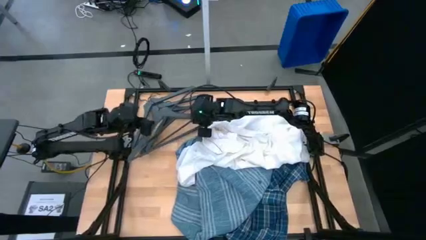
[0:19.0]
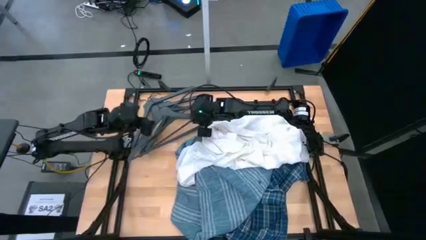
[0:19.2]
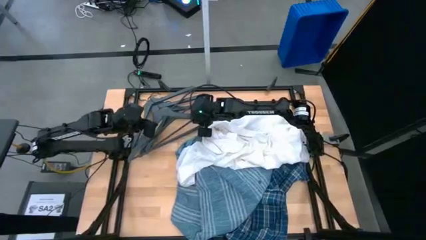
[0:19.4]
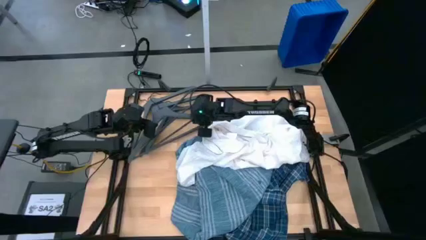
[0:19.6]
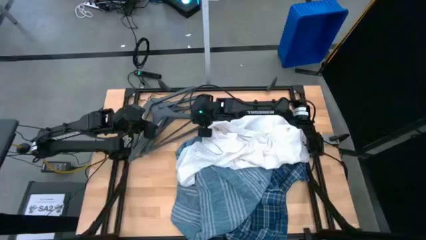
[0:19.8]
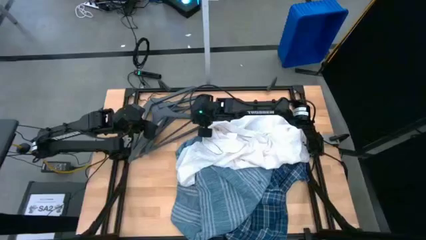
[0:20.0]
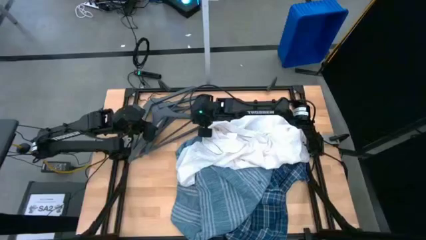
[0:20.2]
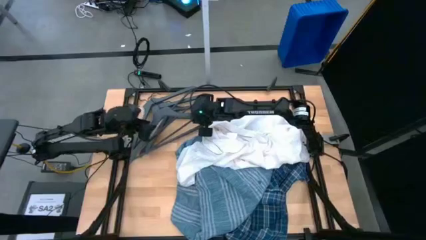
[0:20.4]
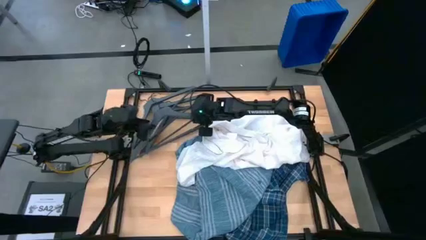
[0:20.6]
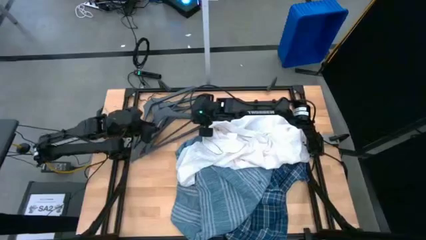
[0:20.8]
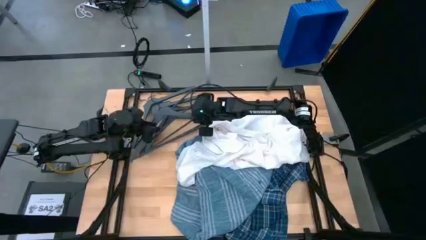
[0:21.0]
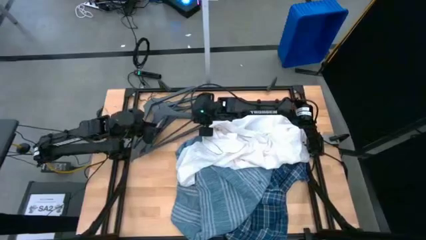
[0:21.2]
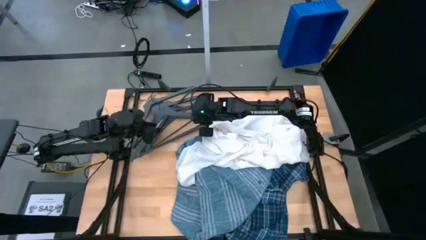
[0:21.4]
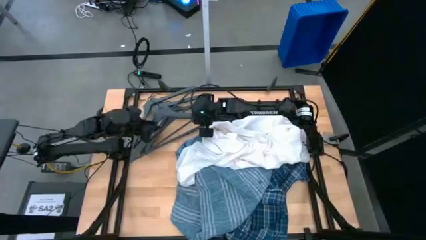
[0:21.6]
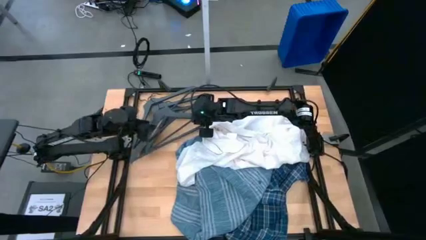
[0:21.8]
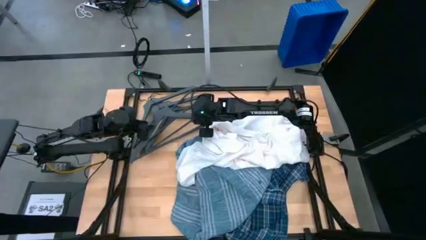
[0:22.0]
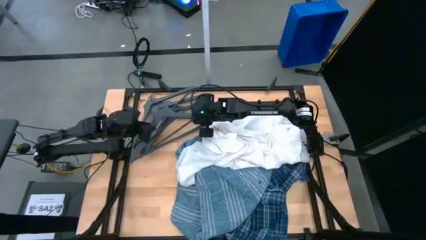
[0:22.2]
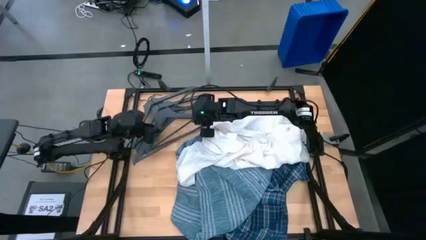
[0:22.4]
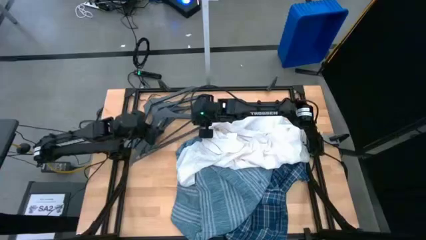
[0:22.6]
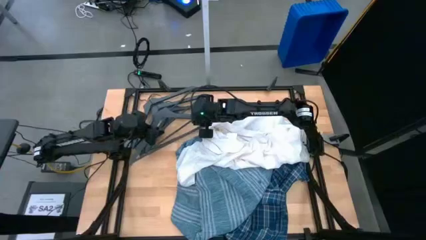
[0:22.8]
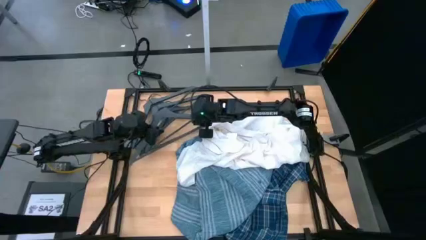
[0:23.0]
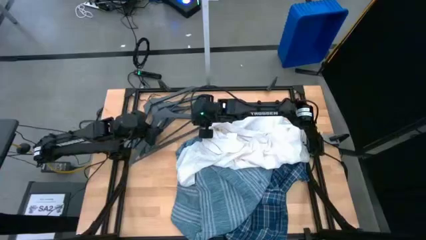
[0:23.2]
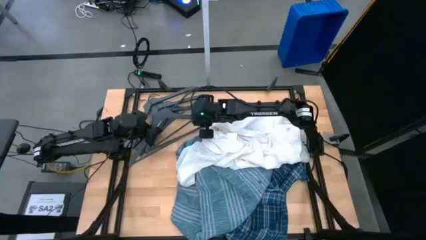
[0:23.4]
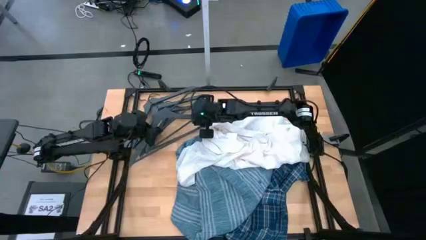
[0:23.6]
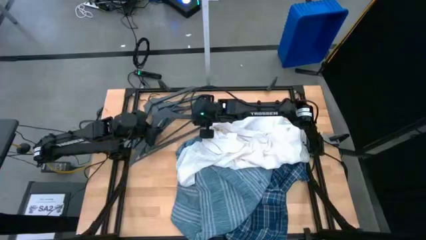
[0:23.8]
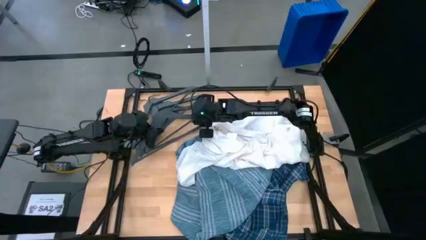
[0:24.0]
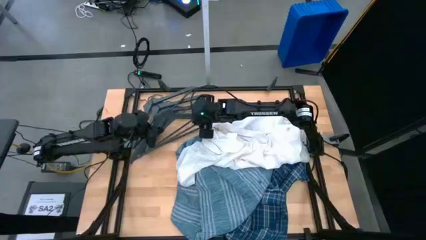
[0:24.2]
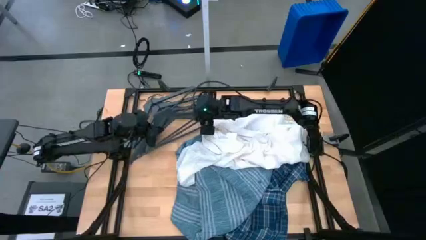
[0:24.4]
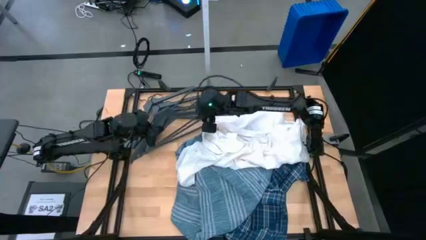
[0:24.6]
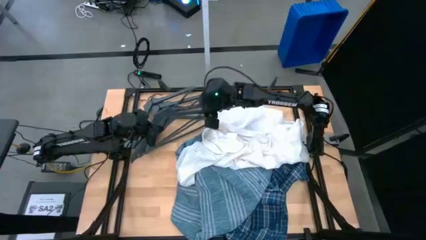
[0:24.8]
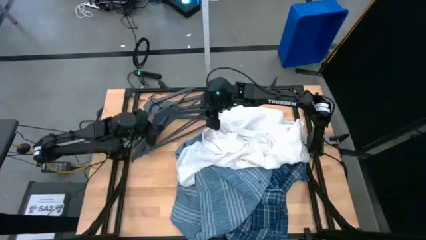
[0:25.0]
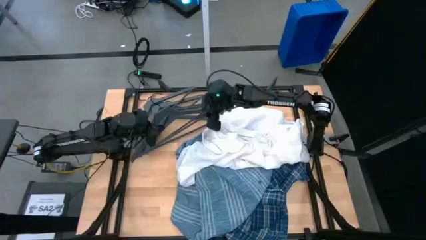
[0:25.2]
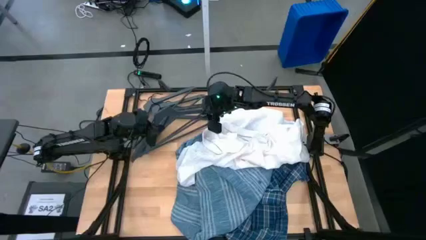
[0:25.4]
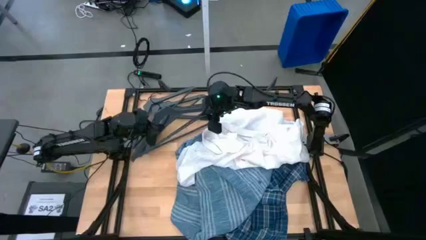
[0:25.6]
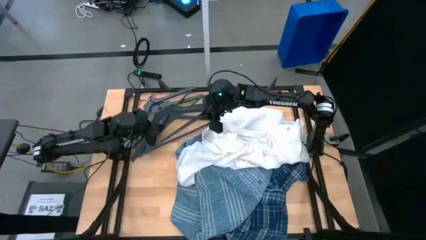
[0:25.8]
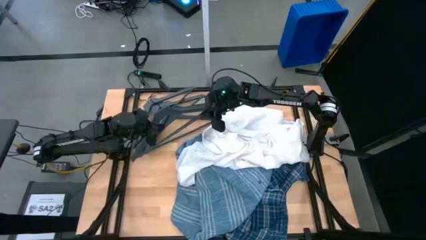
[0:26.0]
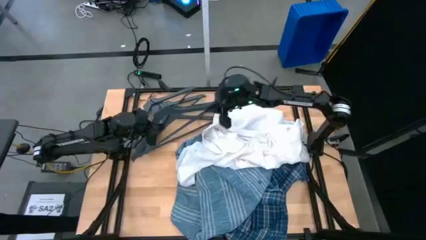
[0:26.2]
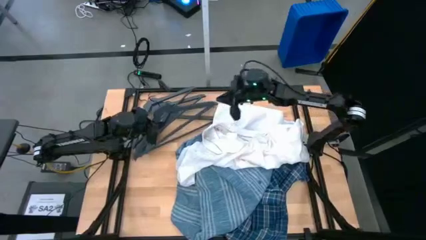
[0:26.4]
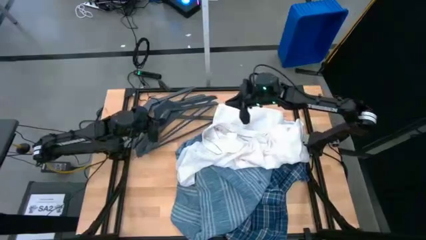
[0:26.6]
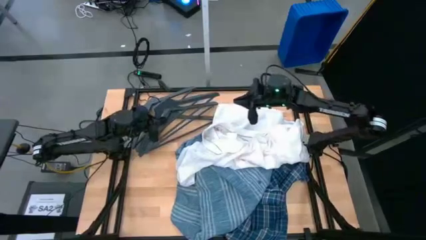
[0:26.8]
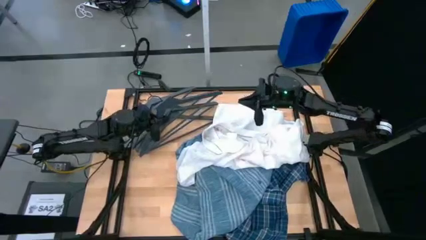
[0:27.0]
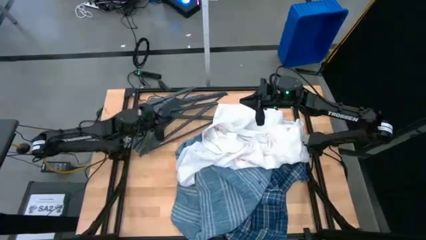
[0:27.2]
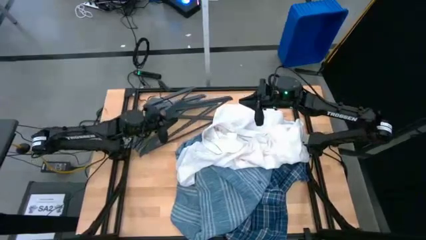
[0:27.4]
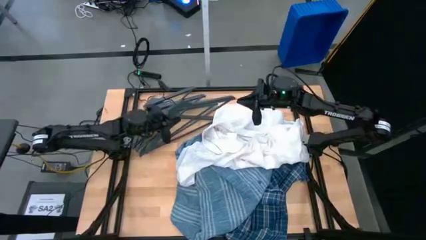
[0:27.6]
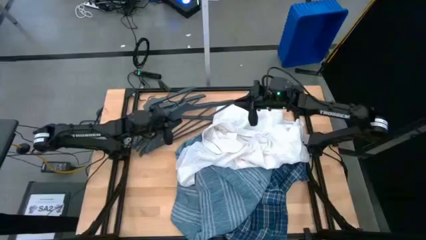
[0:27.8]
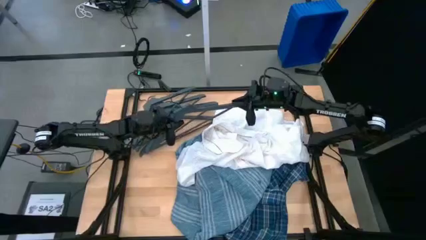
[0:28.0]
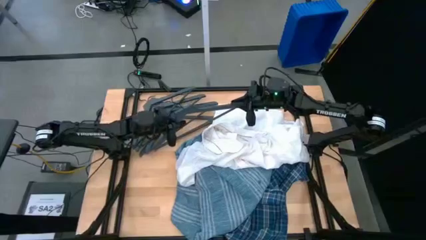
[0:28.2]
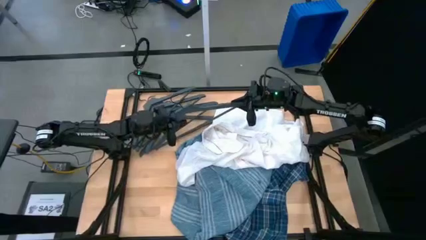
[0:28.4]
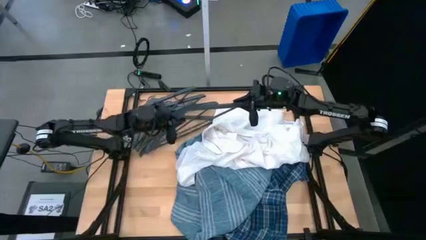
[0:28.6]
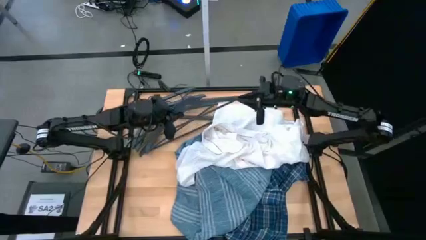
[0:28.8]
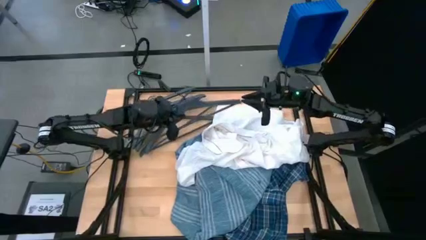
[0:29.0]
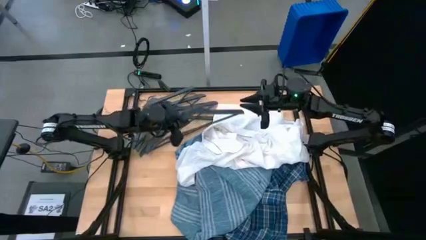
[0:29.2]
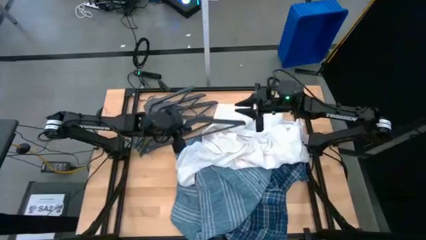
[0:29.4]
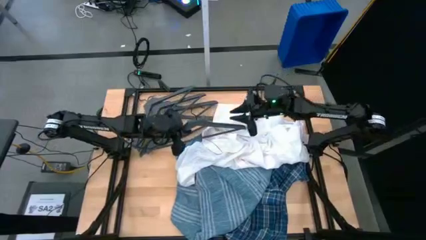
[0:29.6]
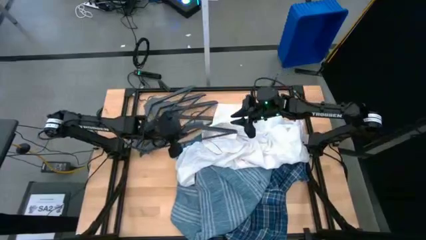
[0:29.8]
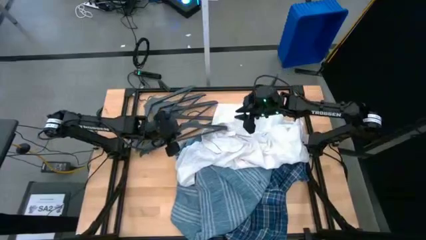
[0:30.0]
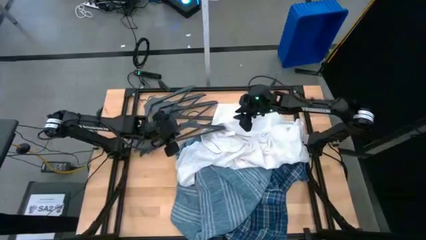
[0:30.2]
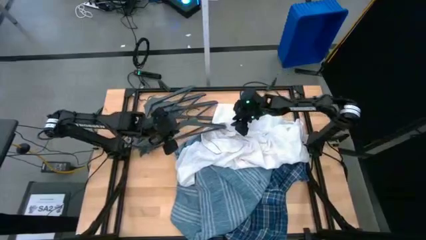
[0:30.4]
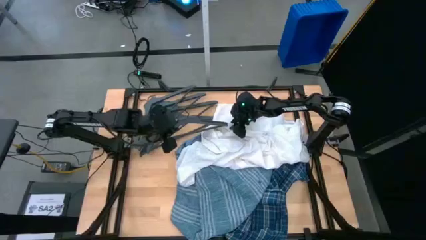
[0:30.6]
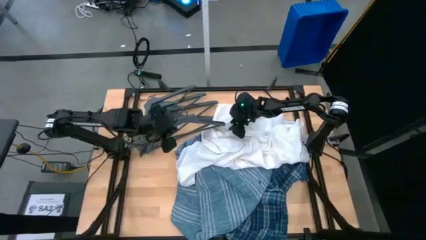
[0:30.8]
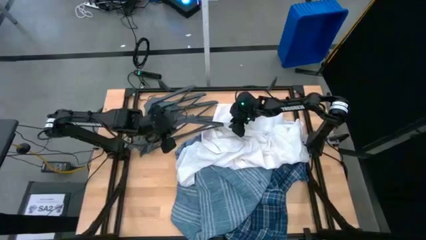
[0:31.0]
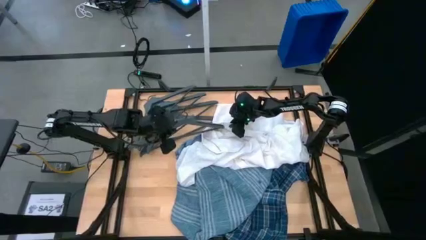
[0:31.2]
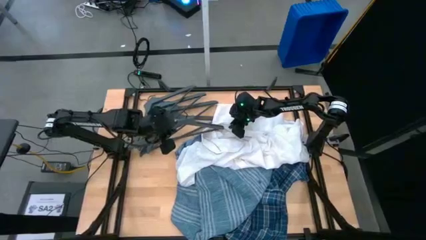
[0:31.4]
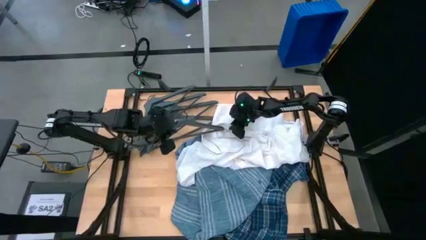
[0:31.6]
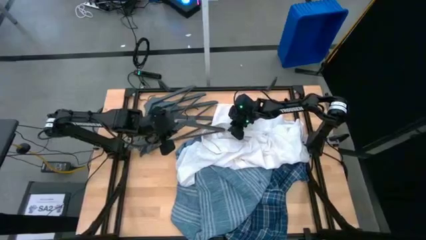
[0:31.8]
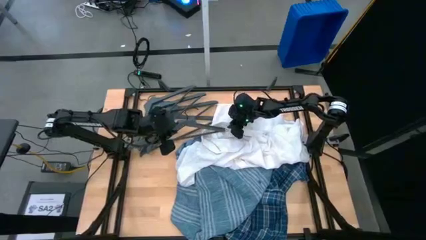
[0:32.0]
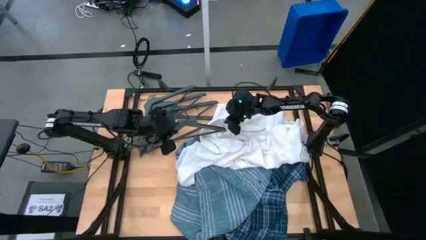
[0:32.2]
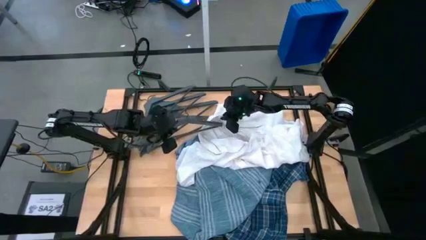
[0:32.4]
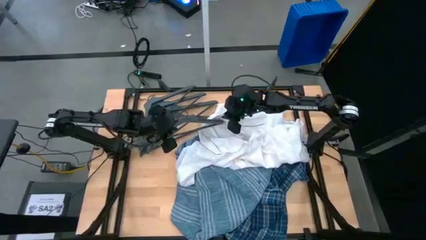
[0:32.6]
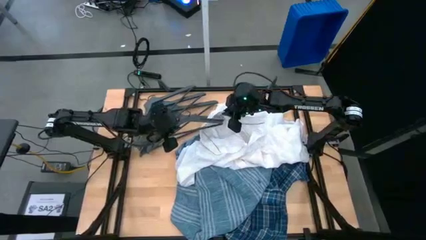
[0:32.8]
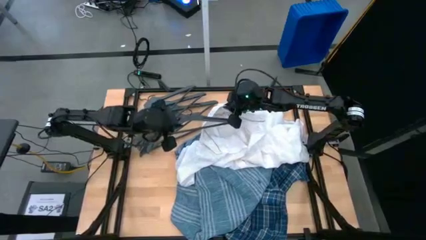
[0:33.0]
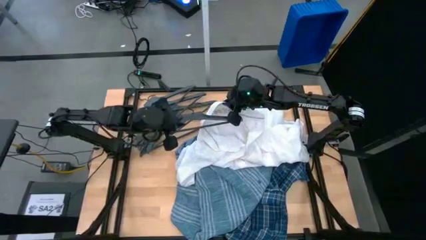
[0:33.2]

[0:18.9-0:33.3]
Task: Hang clothes
Insert the black hanger into the white shirt
